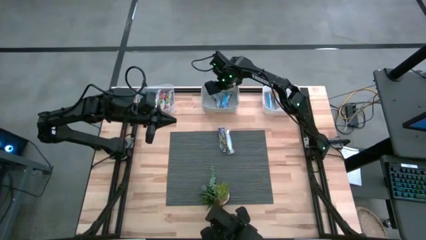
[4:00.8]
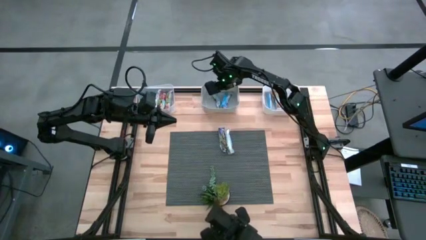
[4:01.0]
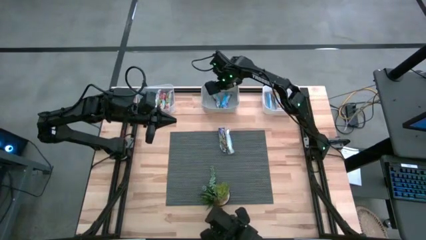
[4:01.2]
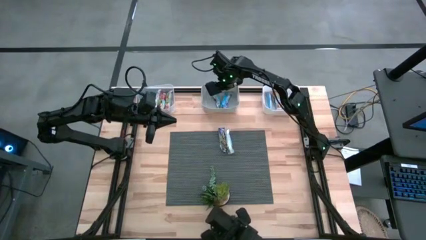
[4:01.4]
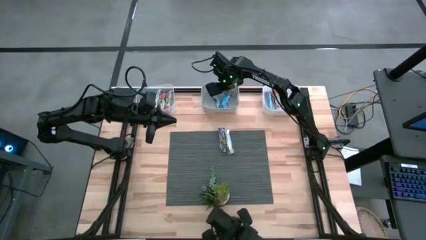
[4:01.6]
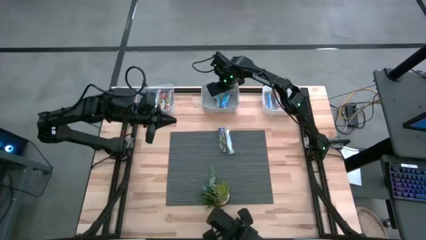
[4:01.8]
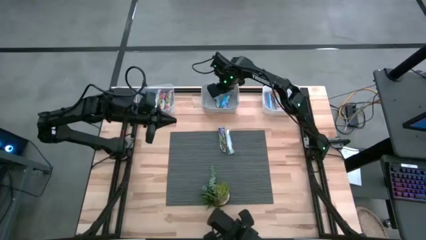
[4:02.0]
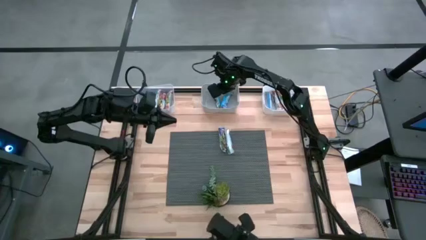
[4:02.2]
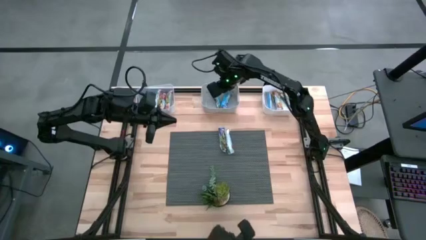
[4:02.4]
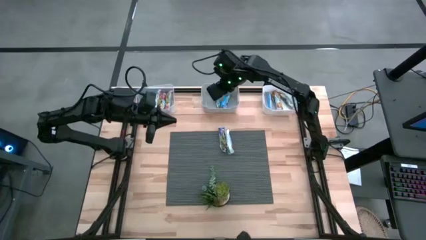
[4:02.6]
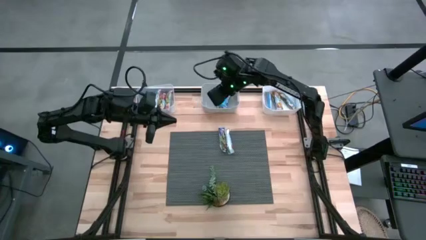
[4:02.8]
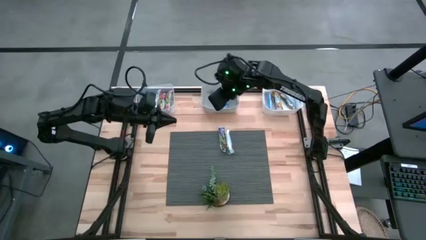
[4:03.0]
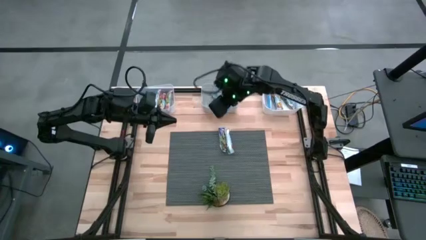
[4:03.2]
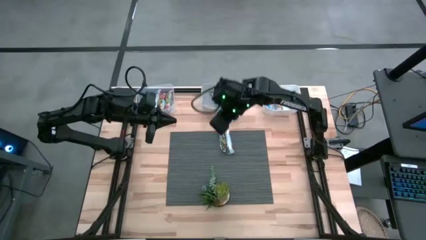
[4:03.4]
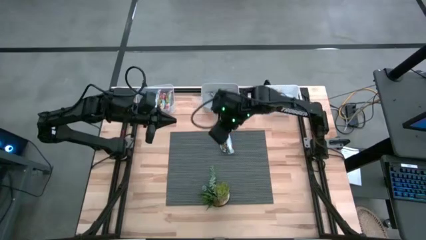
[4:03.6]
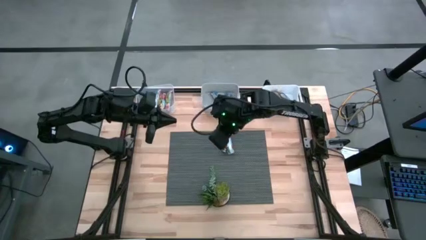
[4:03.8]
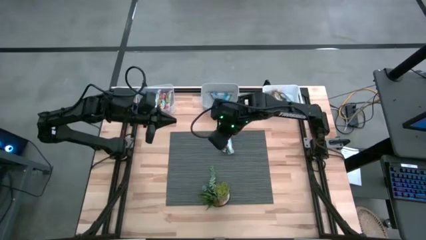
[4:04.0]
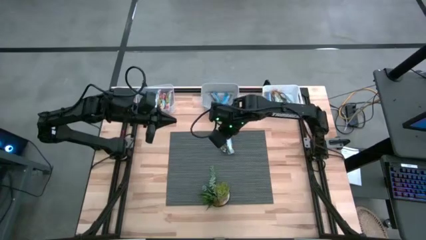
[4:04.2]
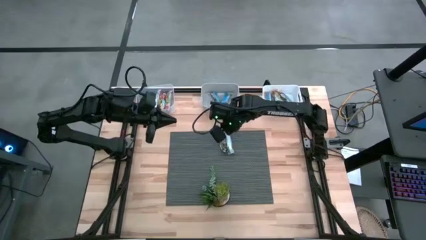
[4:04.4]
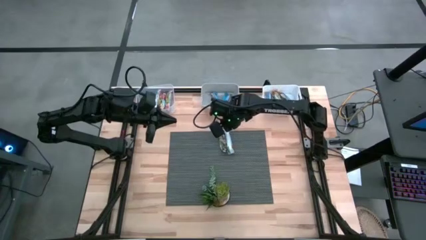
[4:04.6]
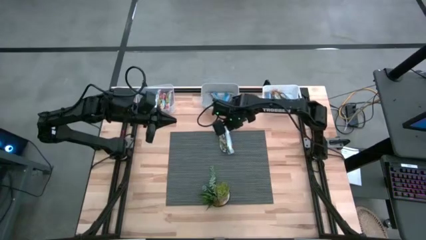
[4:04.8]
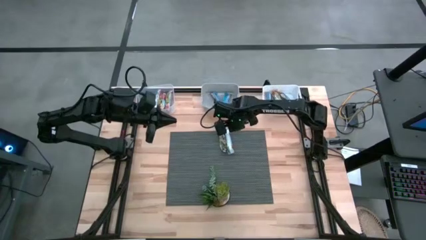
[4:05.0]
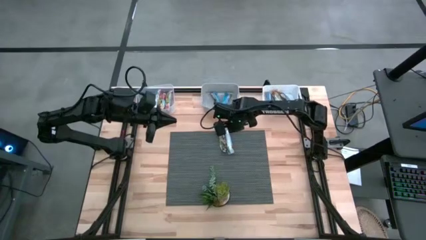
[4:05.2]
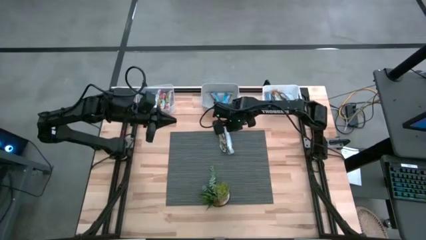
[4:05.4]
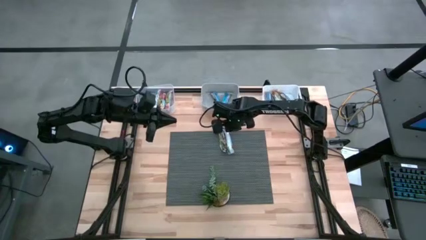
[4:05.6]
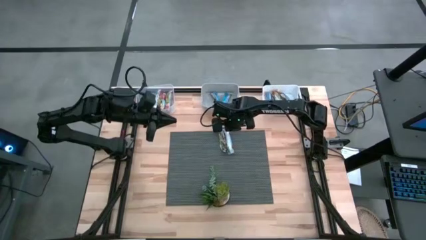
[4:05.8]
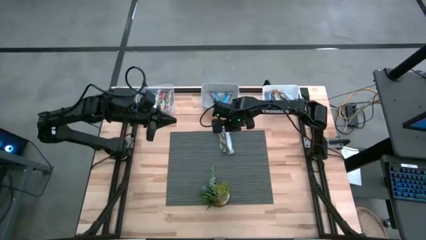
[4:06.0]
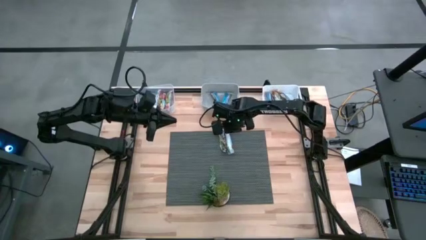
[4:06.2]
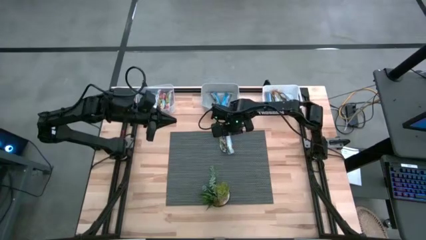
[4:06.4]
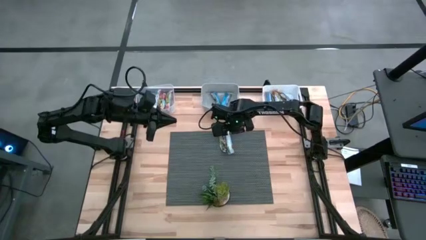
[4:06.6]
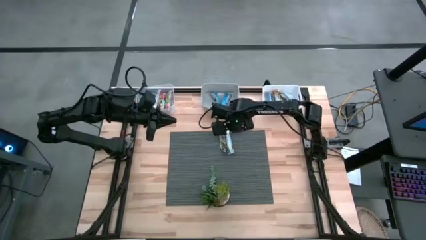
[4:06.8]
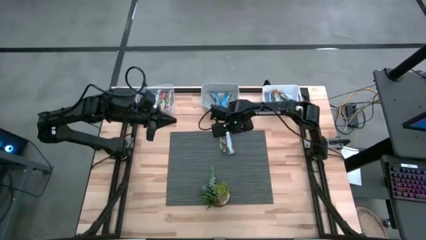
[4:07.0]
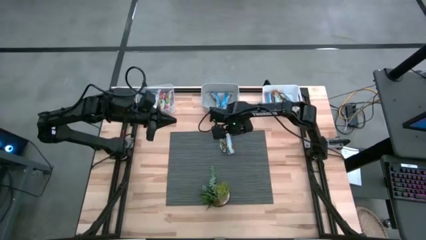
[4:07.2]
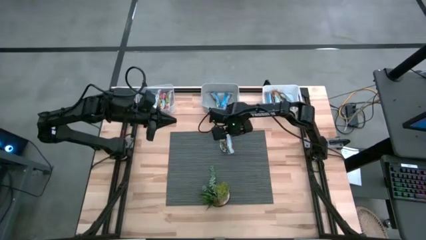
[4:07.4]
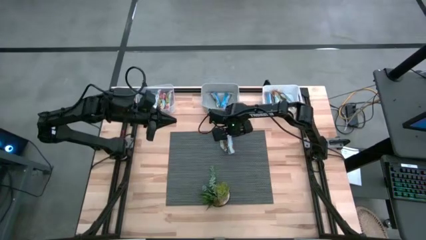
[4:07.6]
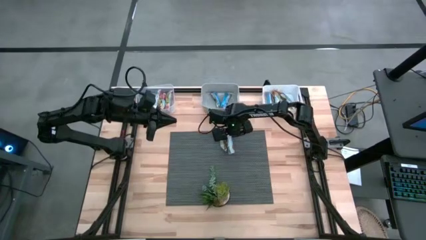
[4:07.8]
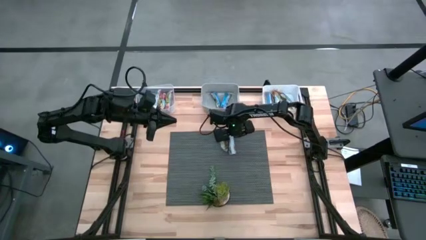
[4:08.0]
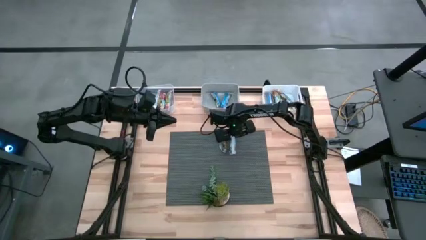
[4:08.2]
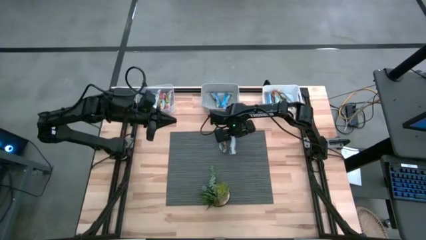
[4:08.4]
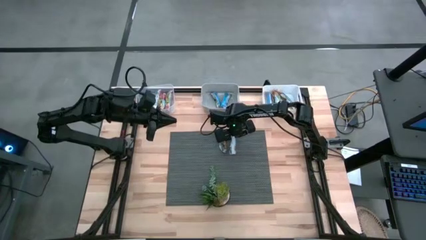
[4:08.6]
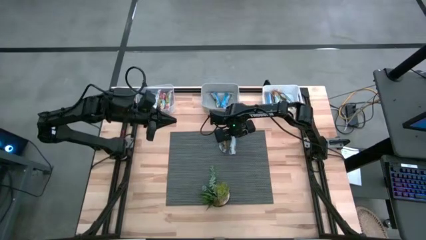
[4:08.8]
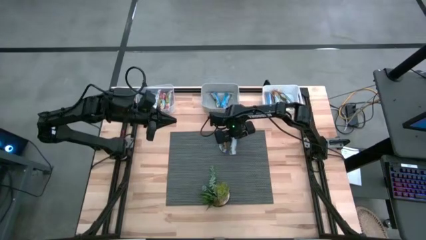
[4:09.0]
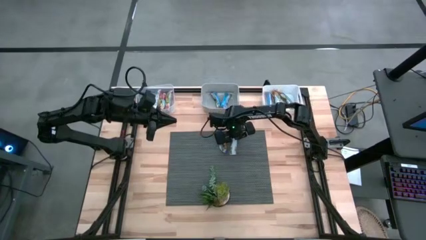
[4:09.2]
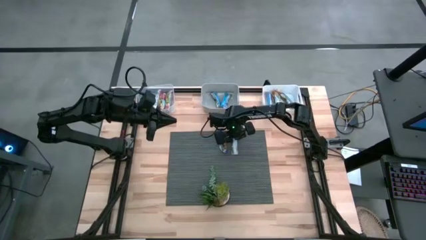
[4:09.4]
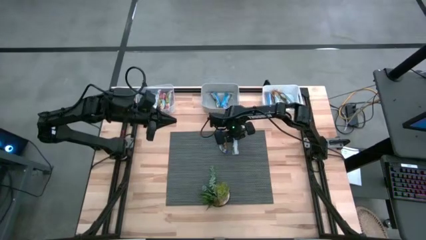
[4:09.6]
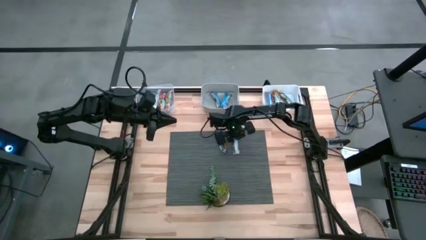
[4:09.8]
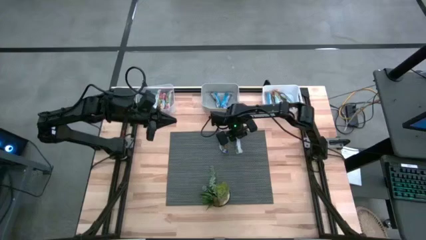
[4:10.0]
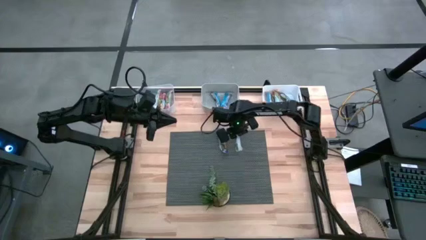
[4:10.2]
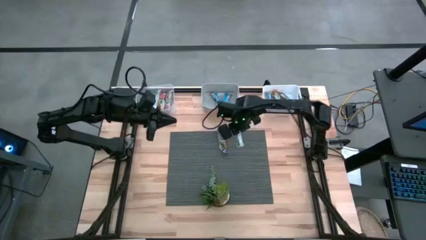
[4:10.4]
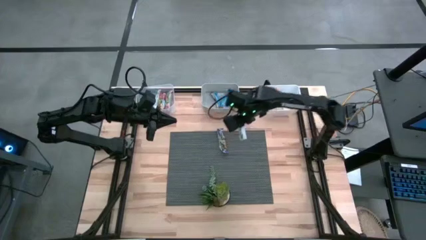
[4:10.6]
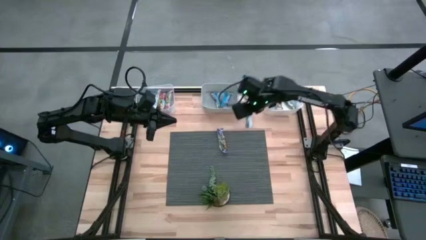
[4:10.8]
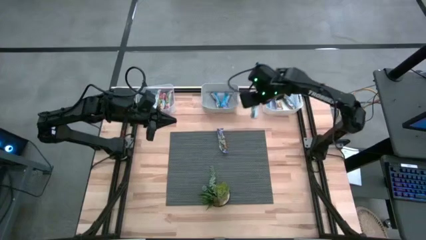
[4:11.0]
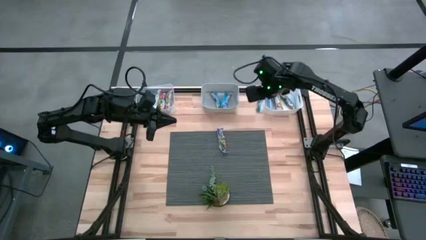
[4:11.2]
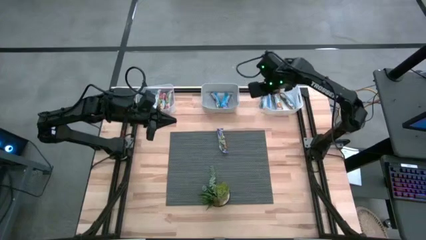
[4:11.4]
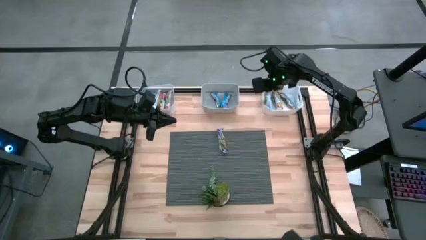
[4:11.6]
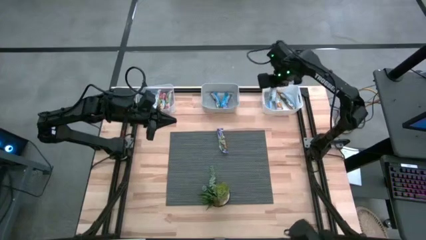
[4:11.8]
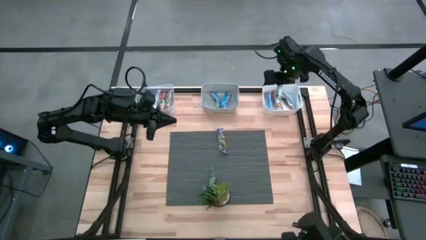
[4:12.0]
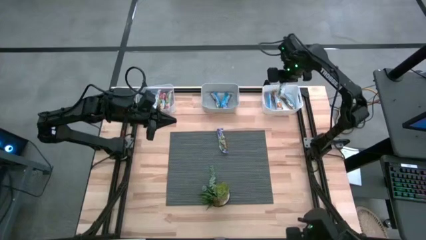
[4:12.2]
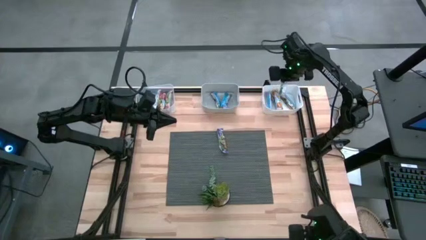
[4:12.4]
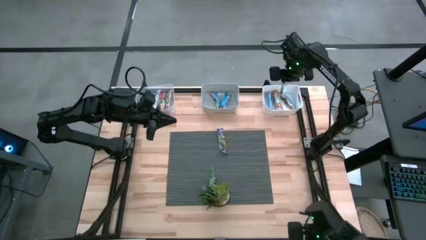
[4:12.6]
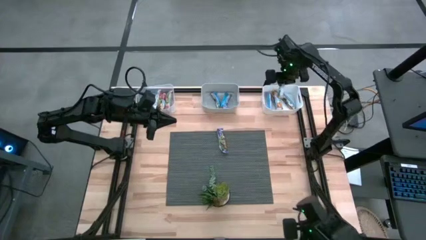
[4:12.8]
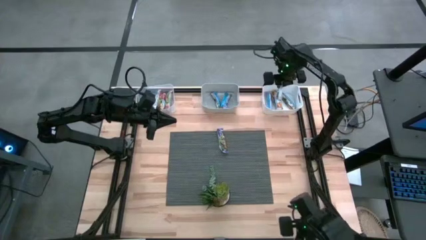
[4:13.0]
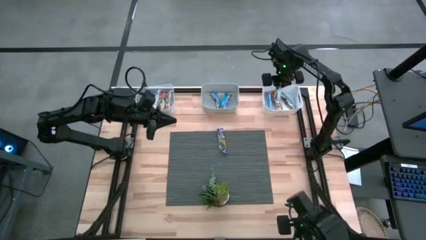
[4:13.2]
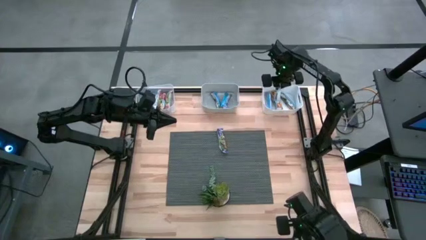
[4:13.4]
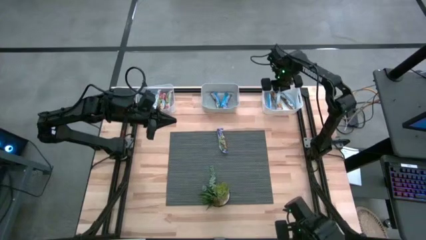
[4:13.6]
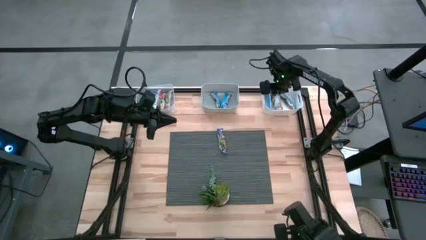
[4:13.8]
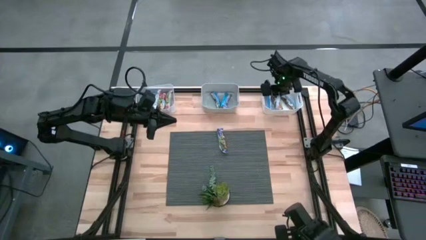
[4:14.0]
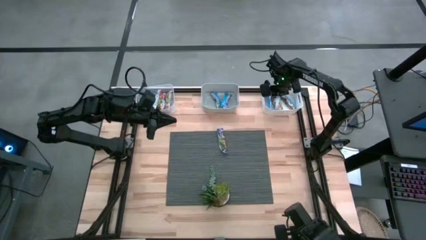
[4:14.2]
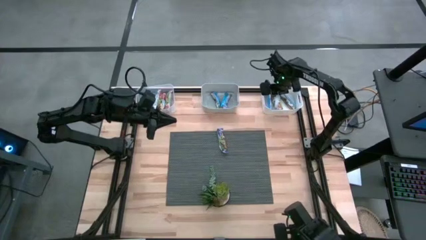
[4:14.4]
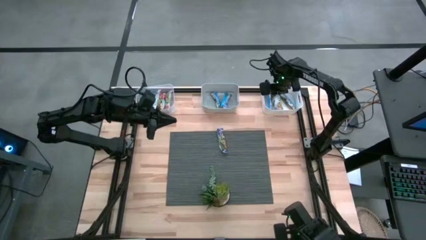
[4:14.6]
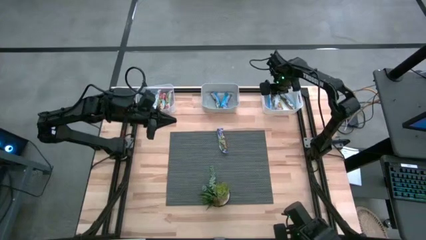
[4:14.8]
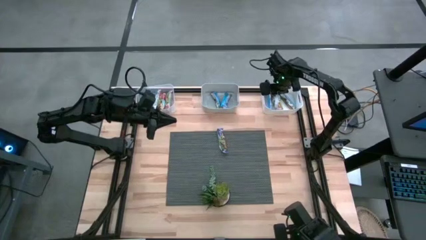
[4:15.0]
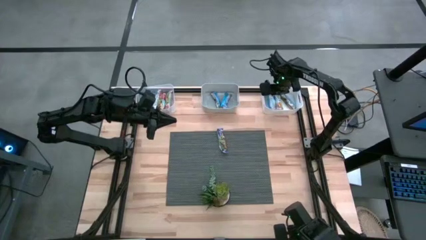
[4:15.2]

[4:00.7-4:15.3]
Task: Pick and place Granola Bars by type
Put the yellow granola bar into the white bin

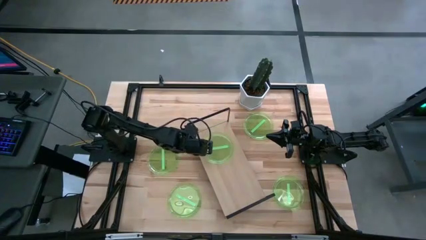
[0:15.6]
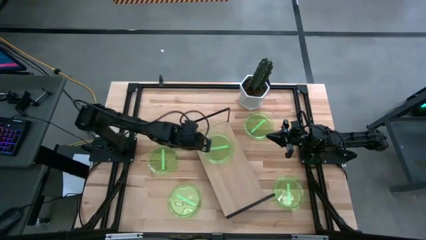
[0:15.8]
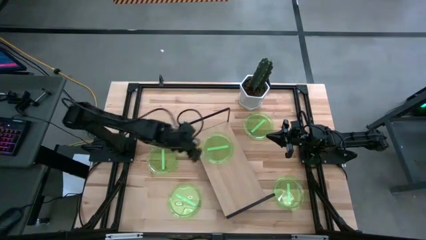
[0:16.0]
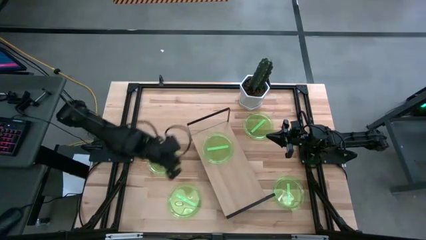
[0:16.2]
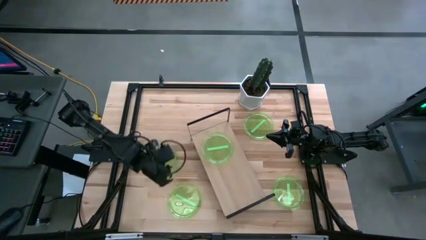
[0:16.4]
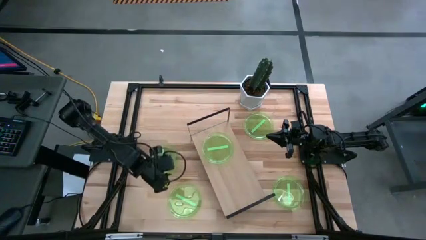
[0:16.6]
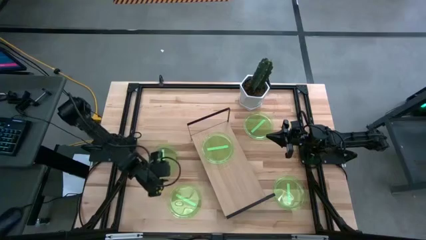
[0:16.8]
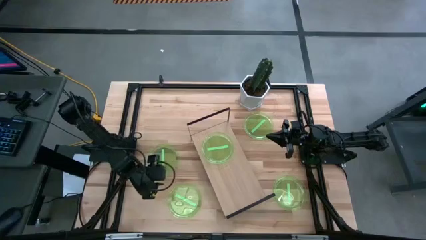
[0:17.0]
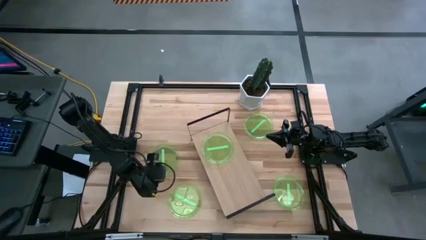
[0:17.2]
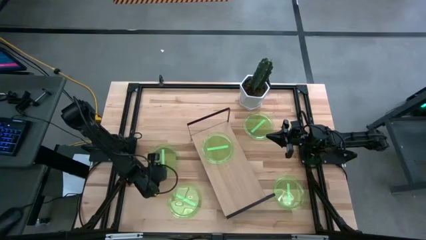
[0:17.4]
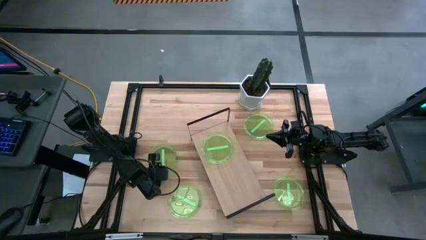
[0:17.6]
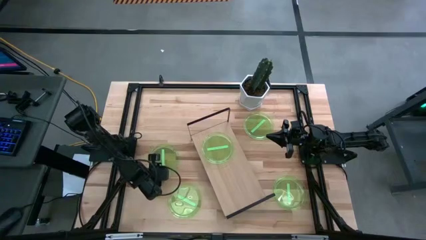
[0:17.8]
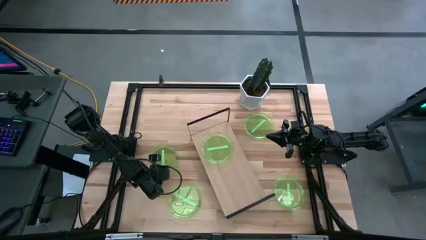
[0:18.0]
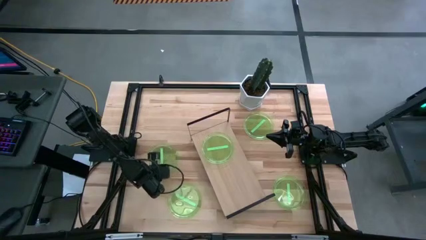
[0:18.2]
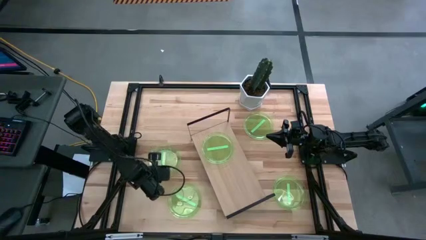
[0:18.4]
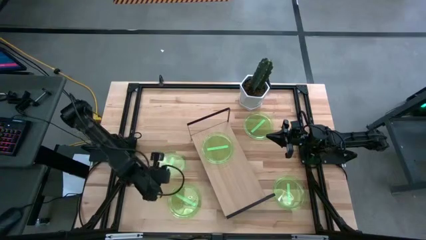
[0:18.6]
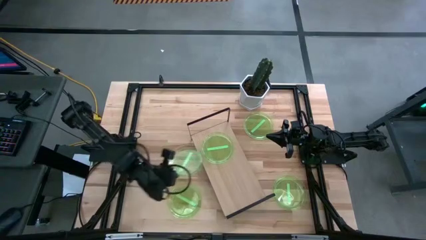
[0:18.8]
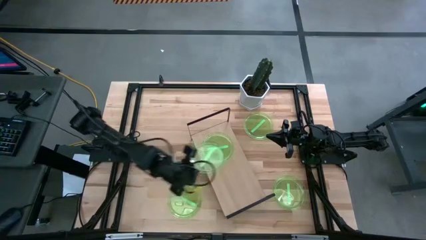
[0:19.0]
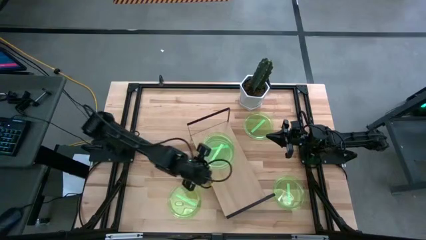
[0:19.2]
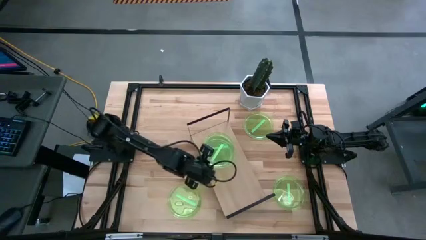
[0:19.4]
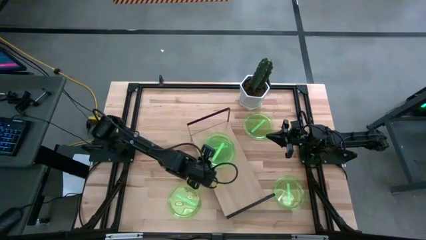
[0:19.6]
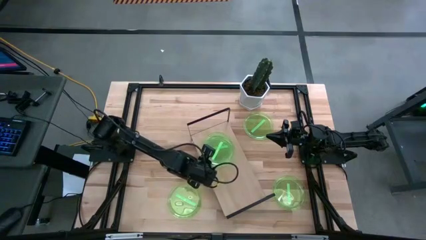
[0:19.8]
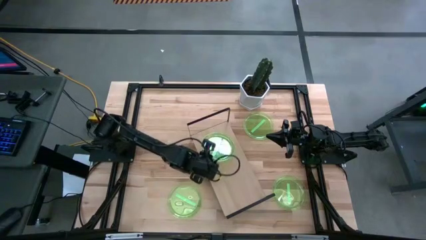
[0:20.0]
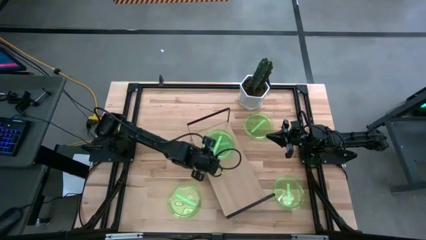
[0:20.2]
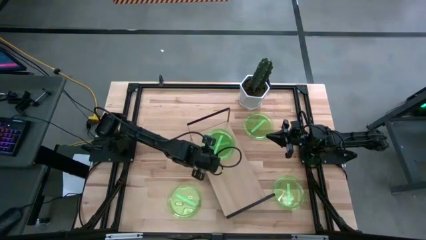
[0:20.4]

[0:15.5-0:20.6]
Task: Place and stack plates onto a shelf
Stack the top left green plate on top of the green plate on the shelf
